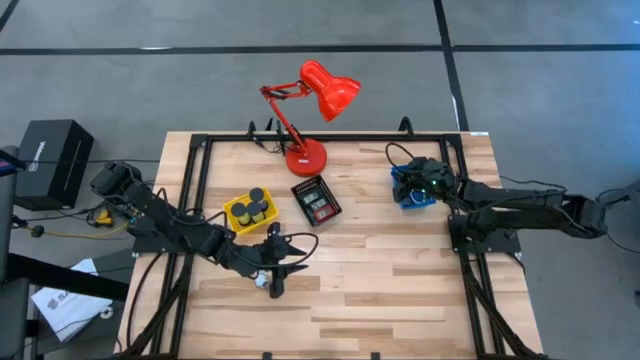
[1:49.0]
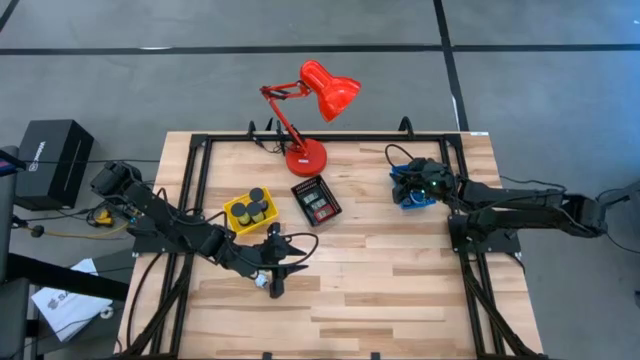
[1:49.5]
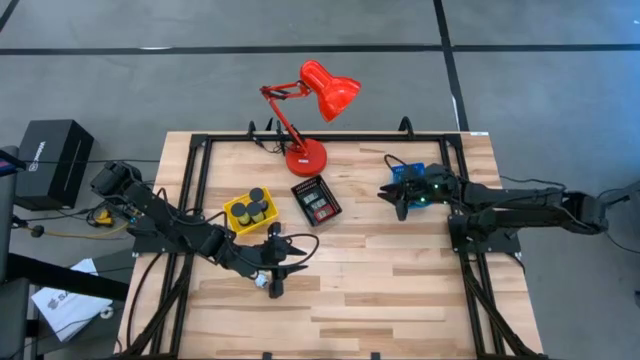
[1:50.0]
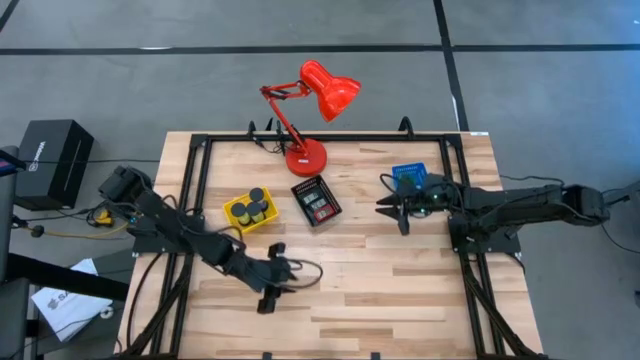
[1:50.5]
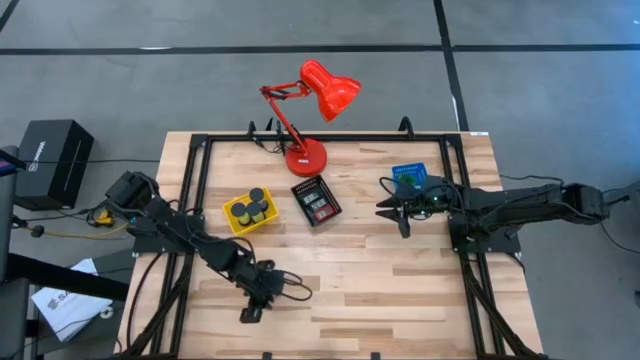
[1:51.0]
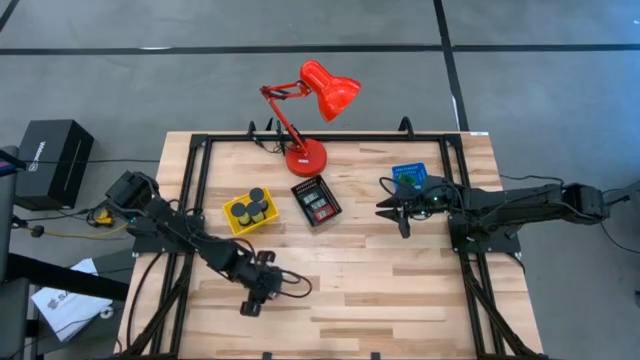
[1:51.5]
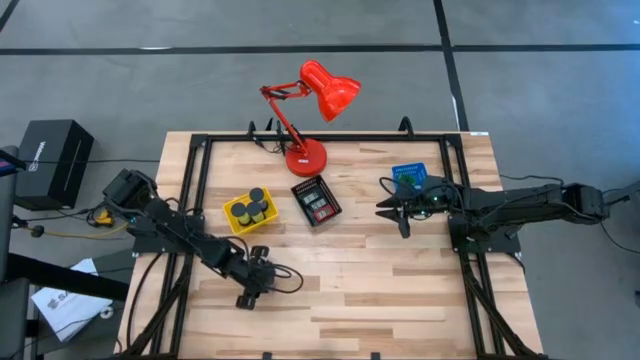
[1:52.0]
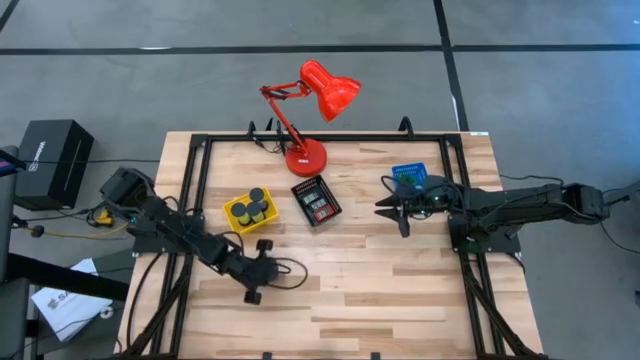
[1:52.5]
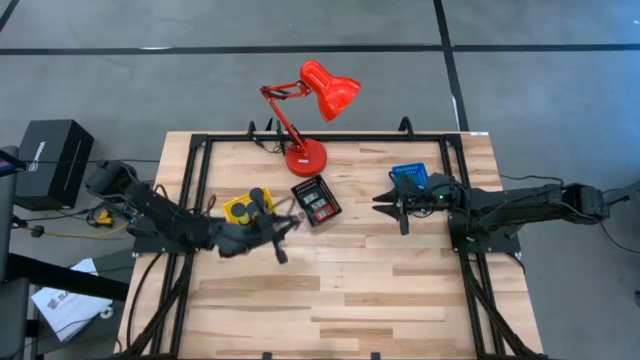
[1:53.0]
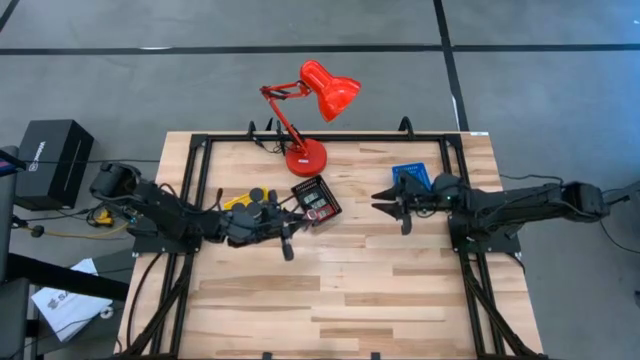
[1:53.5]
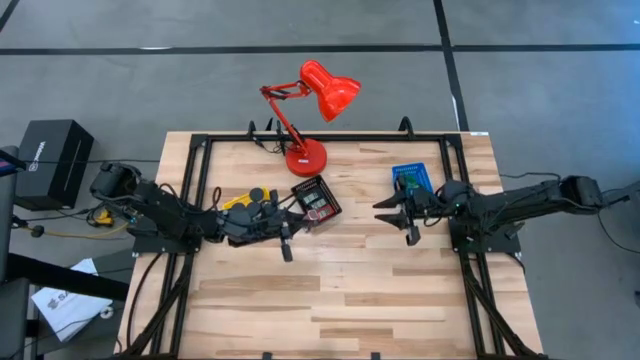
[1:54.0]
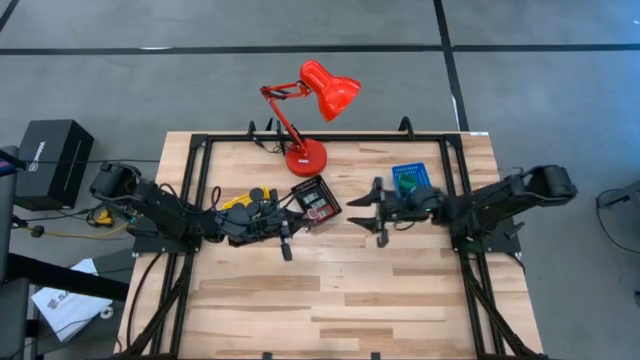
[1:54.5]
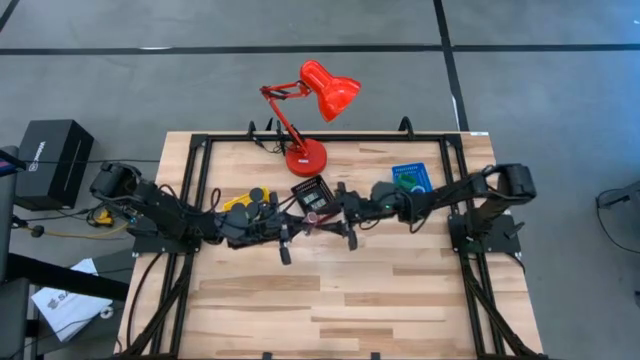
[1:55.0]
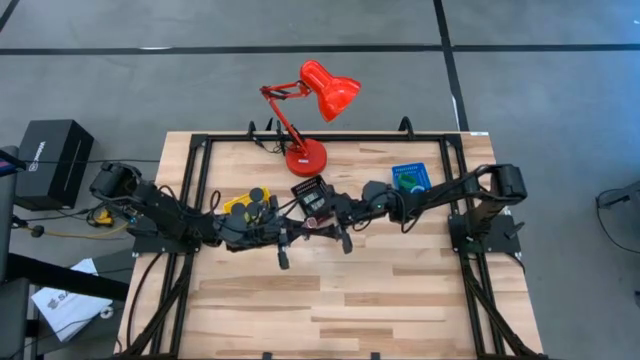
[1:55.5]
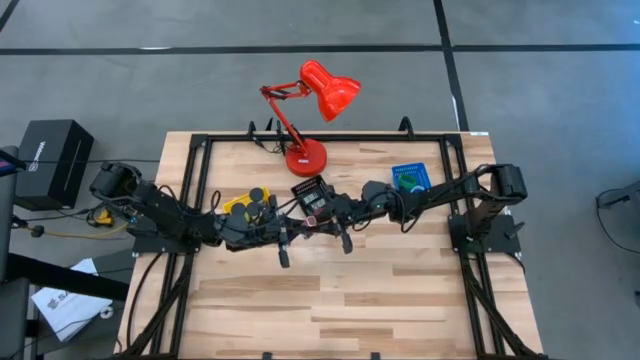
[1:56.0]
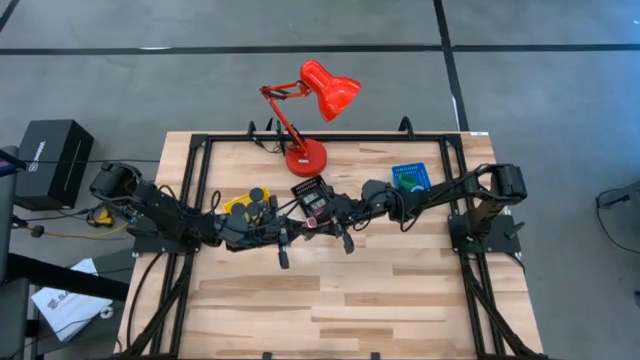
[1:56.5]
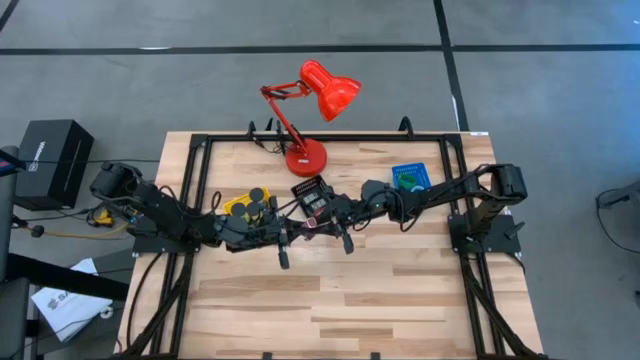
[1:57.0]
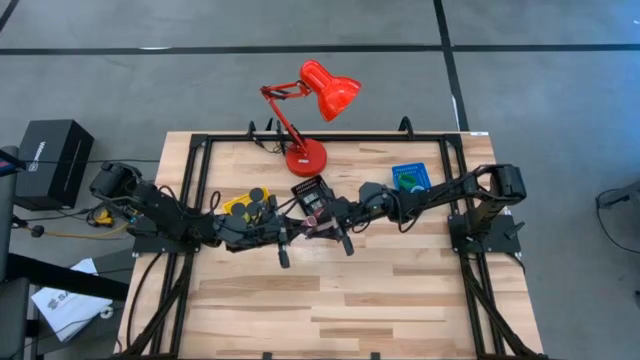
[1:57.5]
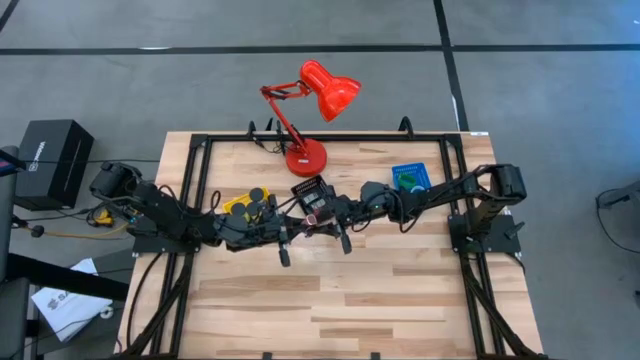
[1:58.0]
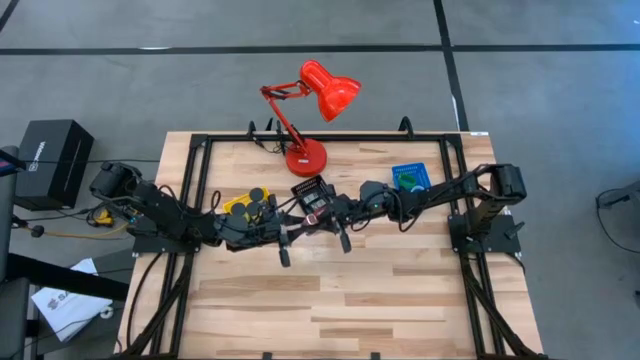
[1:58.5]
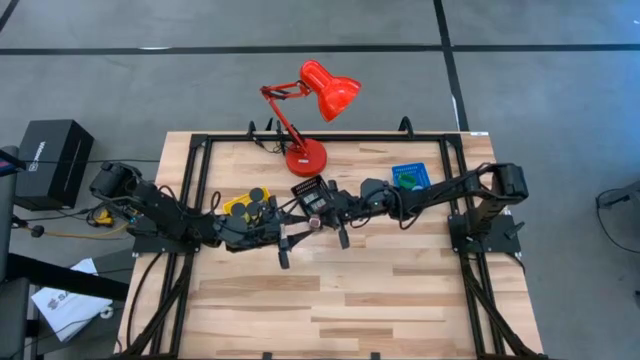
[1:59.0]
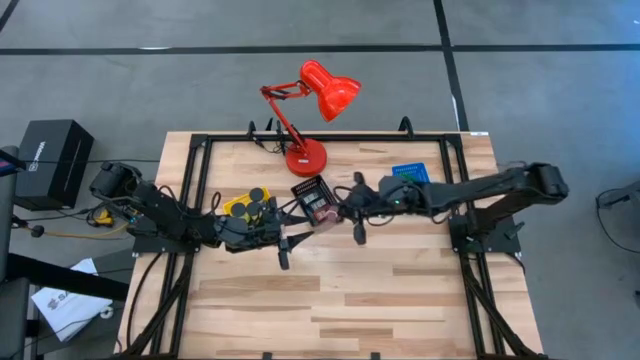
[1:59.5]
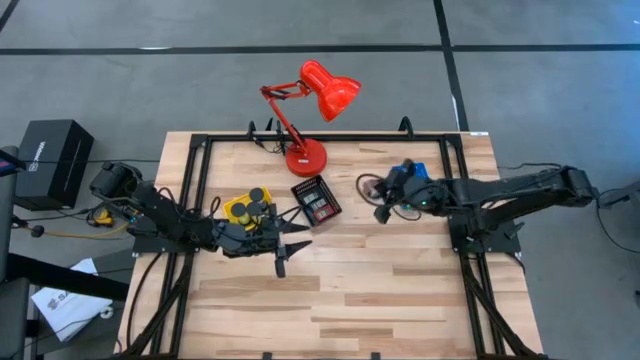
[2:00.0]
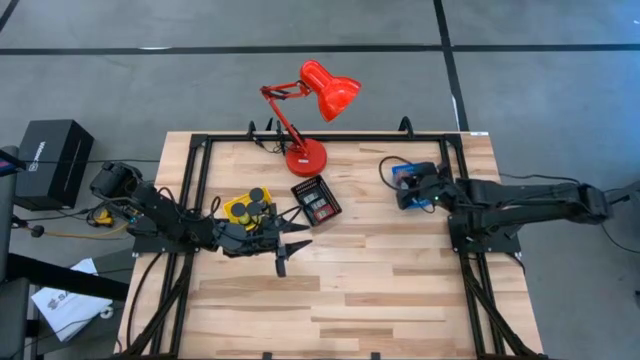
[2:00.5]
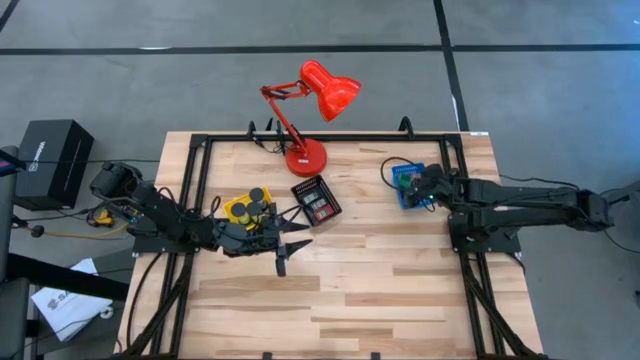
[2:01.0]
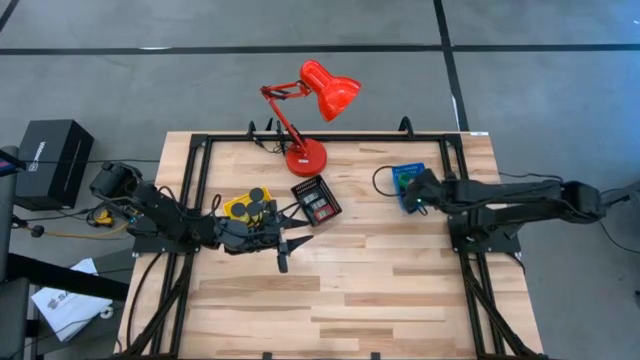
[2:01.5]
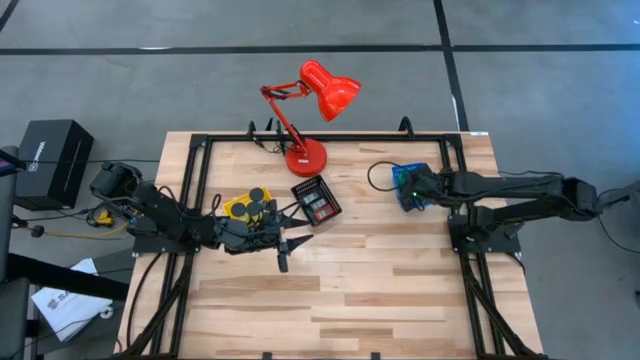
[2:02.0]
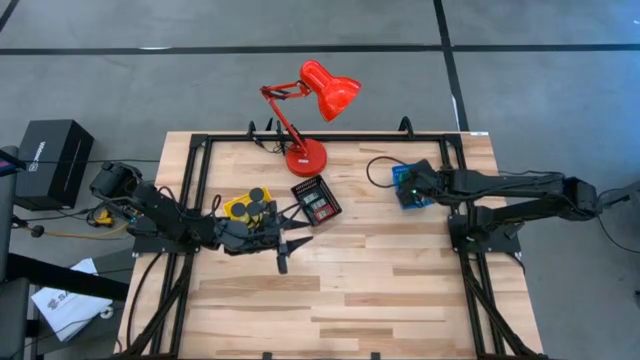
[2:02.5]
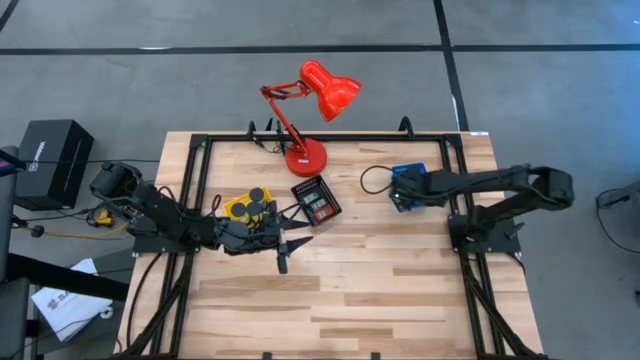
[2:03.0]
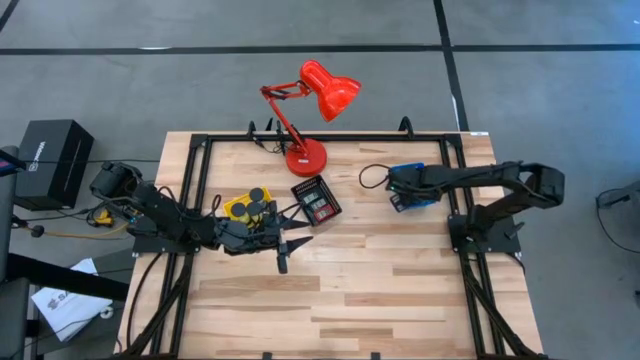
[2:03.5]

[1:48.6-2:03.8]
Task: Pick & Place Office items
Put the brown wrist watch into the blue bin

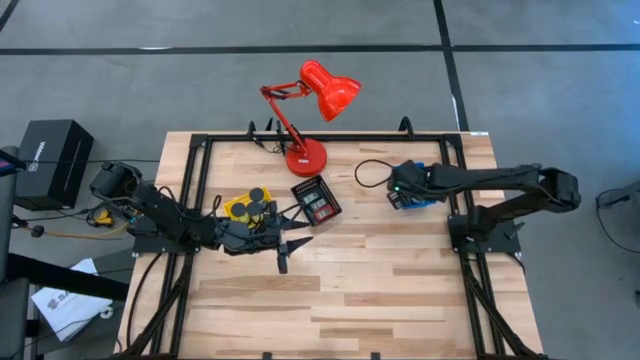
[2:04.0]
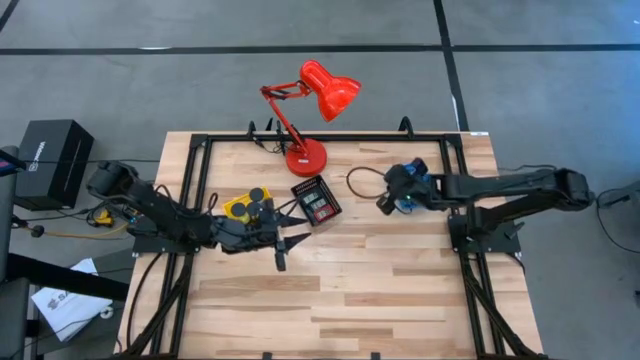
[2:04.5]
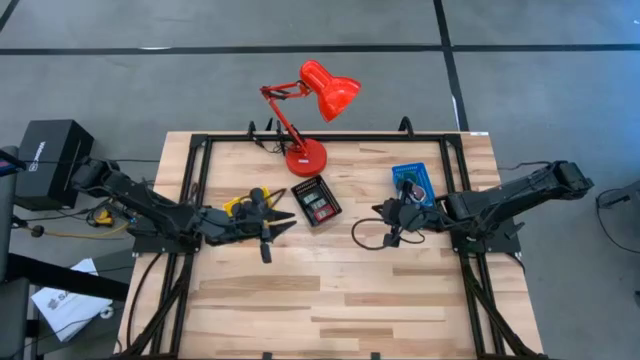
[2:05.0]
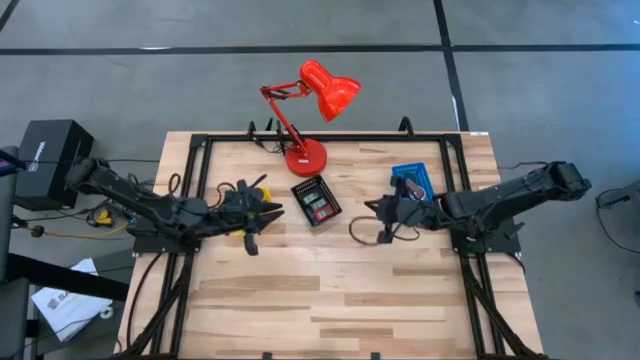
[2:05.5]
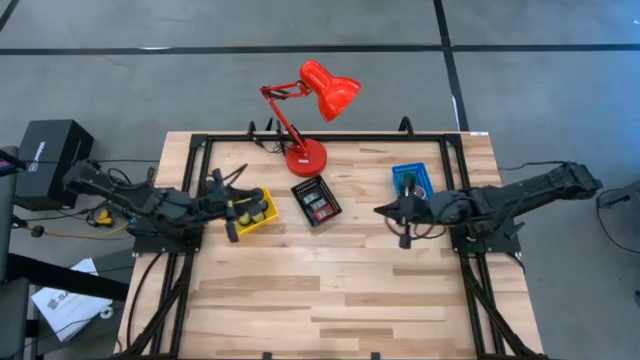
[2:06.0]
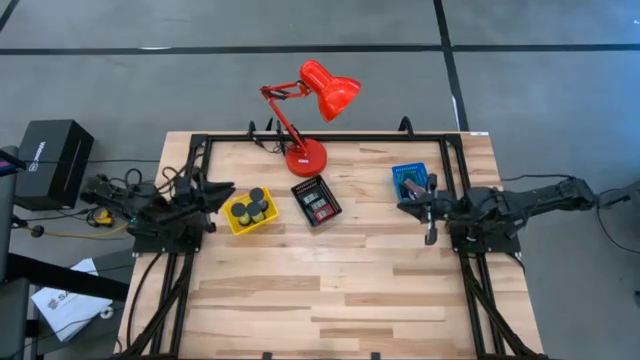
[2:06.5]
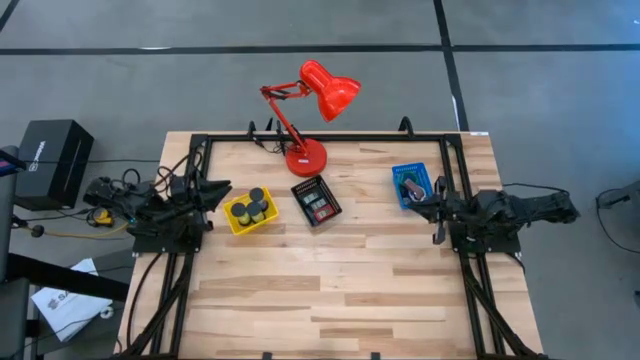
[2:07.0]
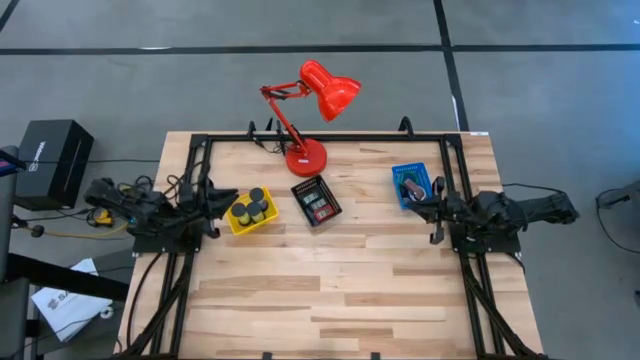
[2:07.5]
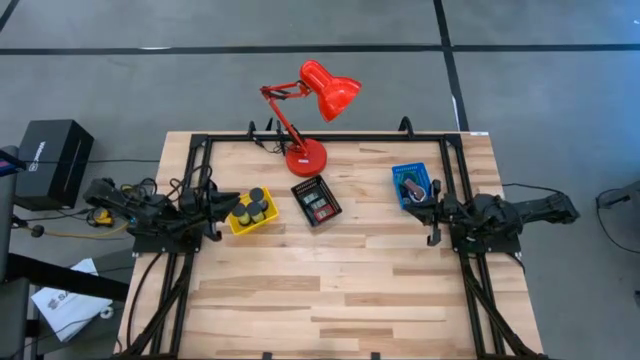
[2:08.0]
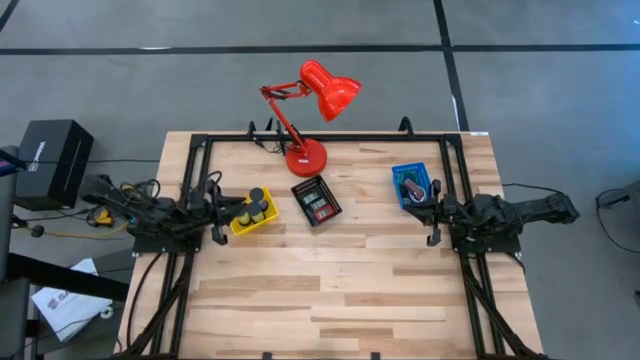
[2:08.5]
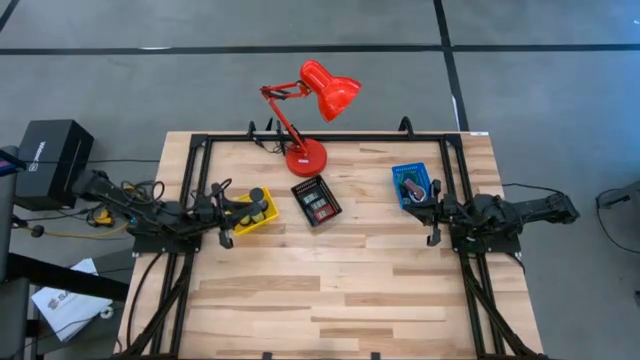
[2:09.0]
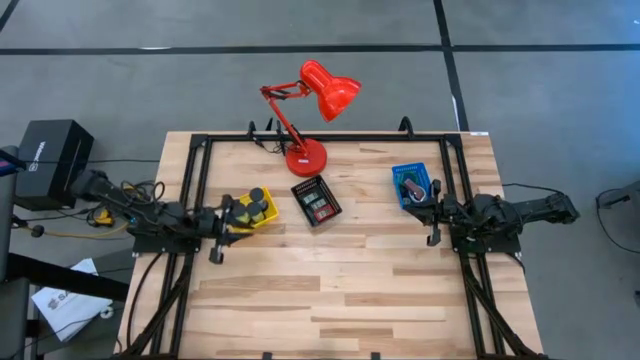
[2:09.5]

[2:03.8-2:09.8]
Return to Home Position
